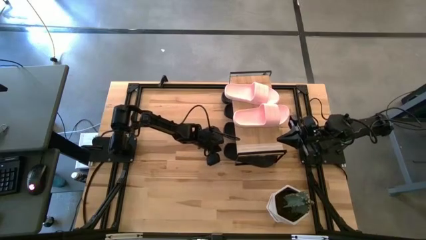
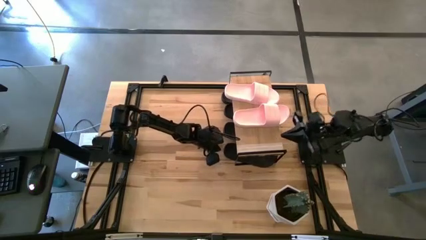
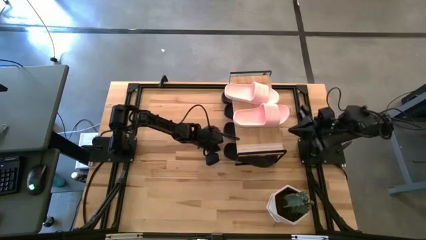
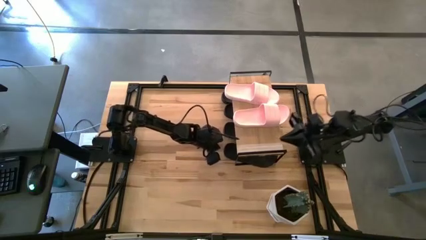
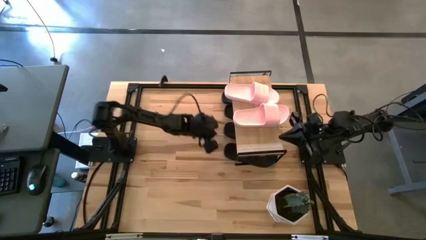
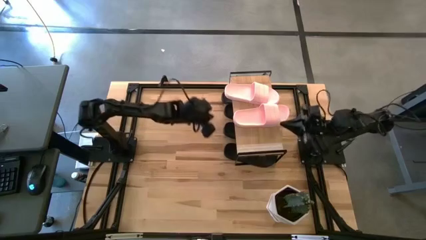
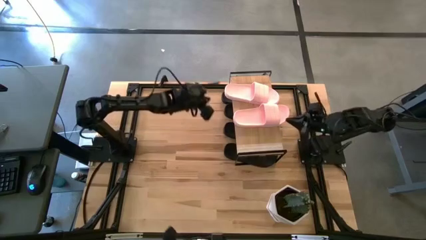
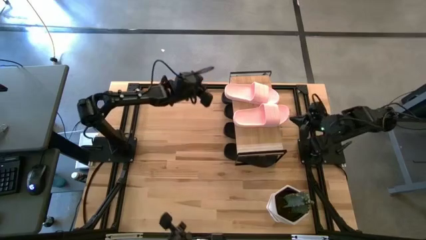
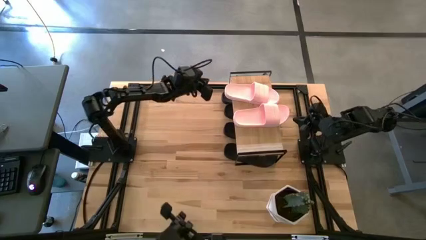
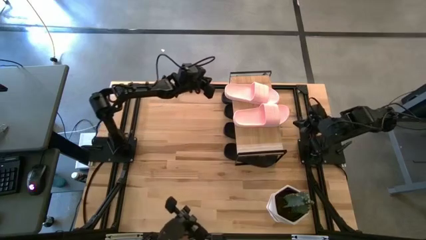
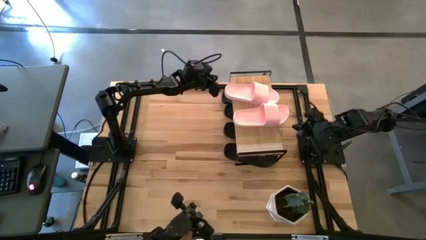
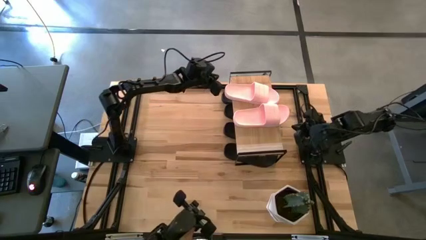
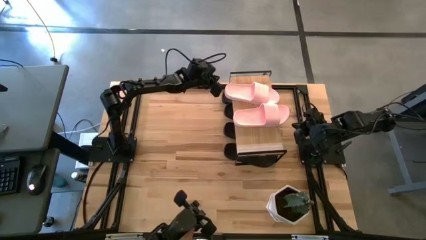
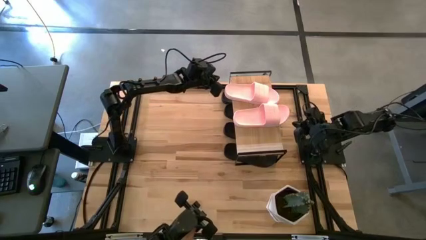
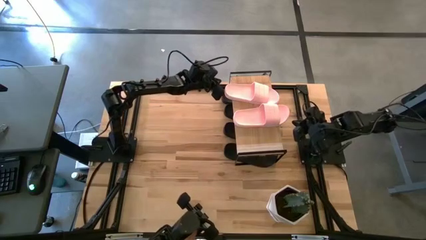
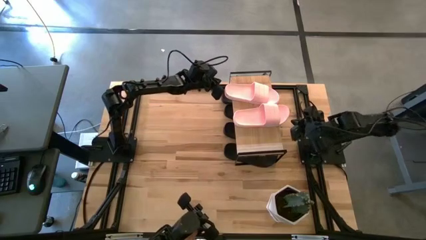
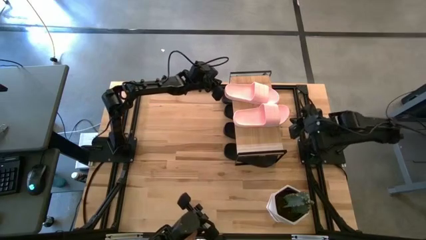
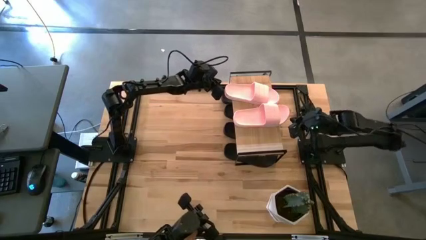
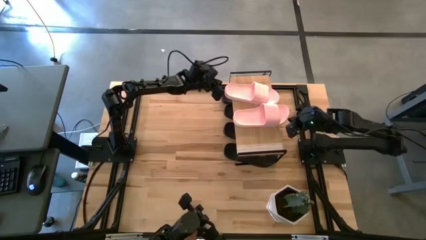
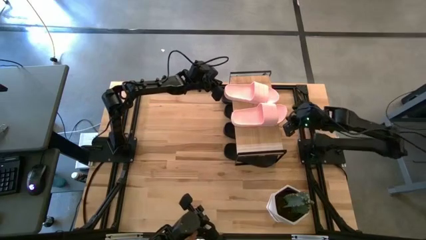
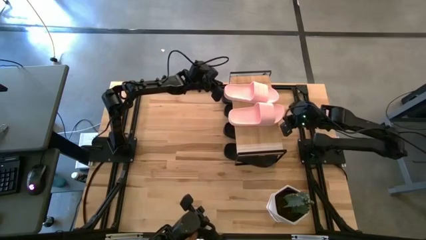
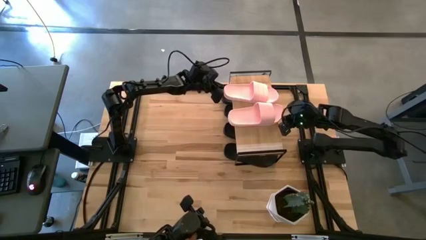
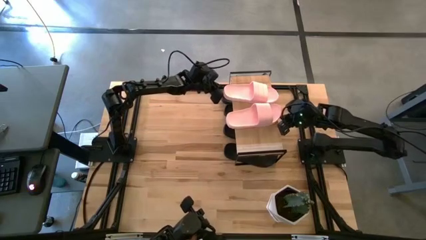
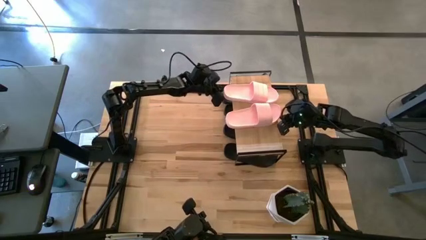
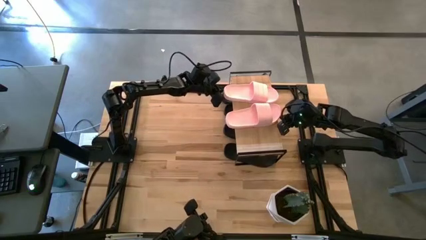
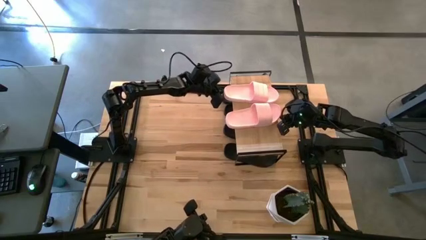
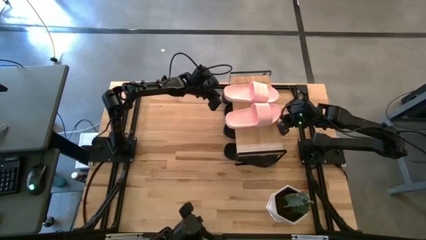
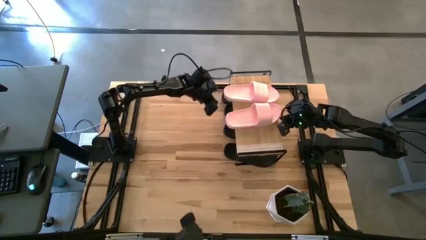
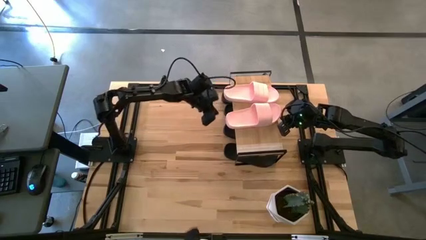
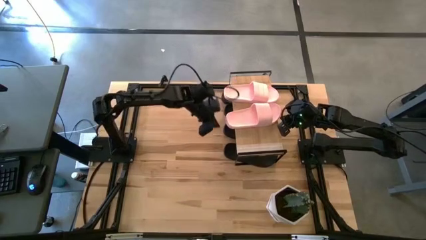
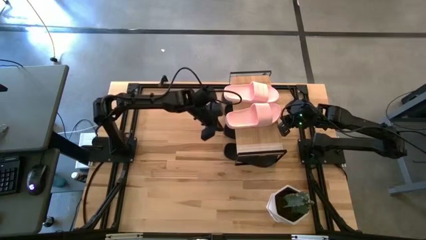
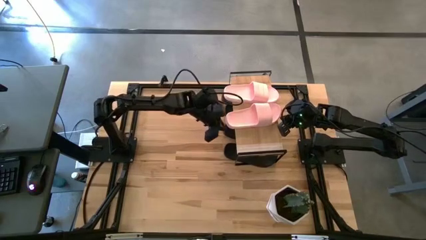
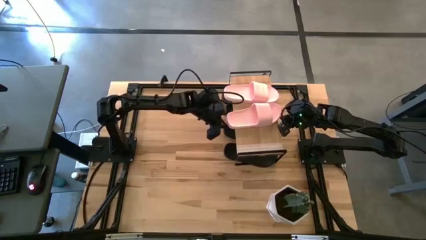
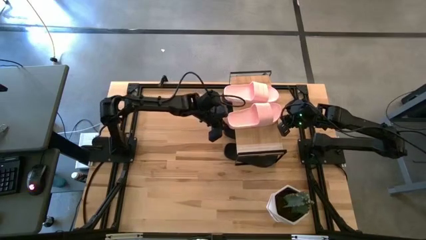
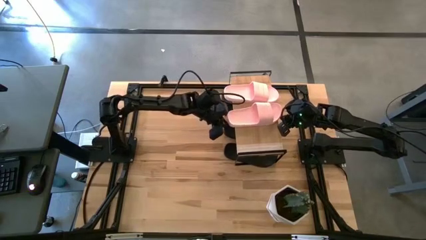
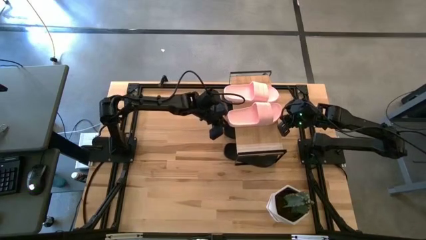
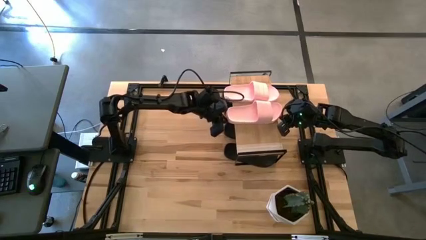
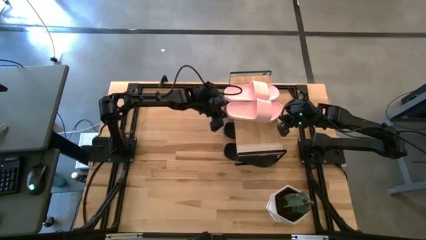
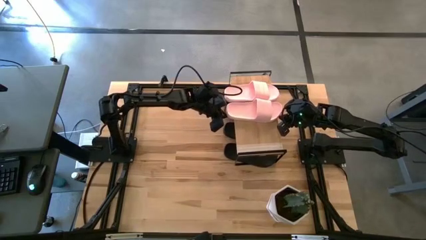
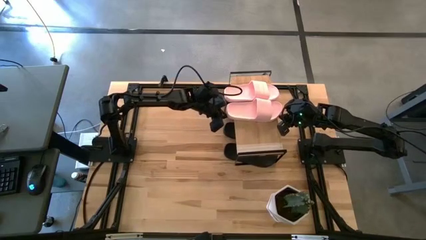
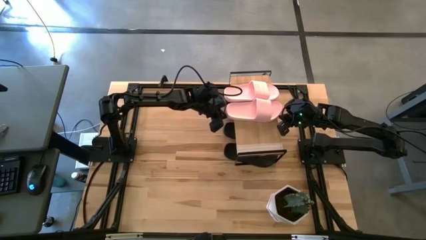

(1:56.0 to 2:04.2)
Task: Pick and place slides into the shelf
Adjust the pink slides on the shelf

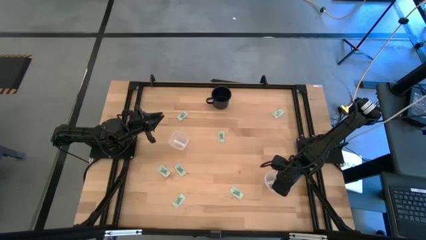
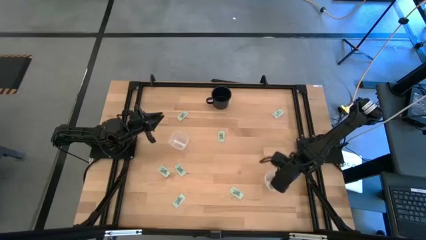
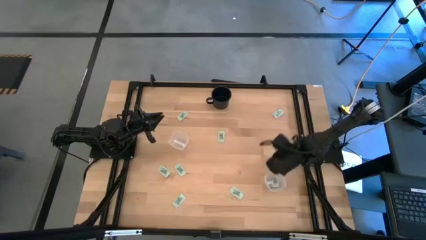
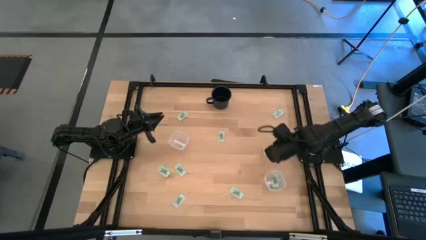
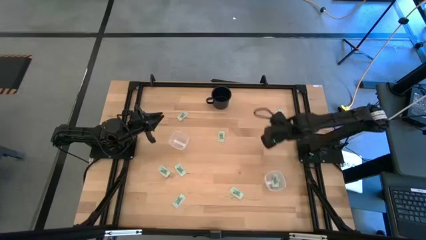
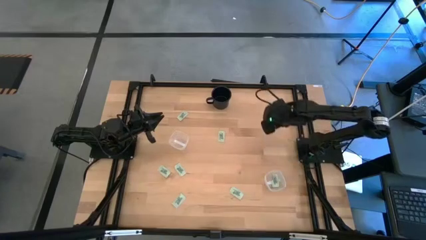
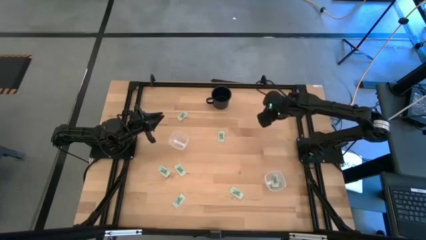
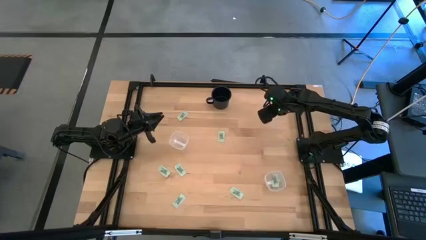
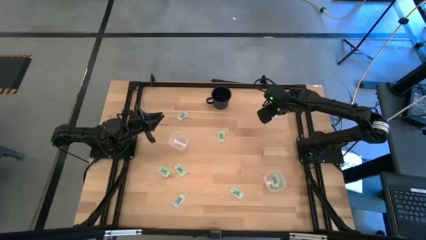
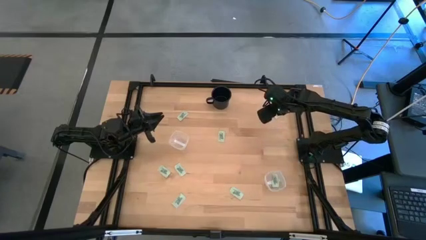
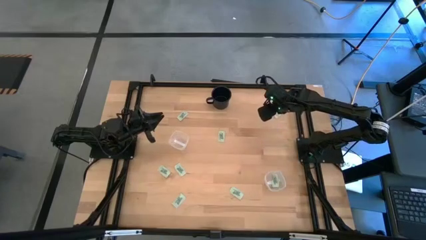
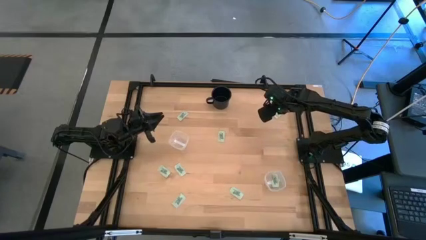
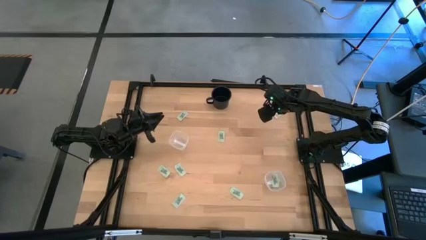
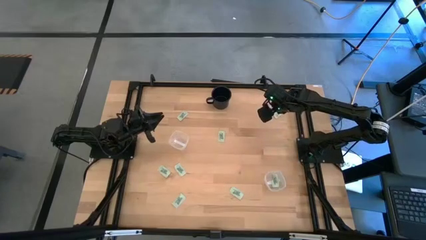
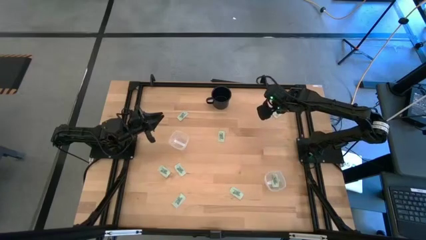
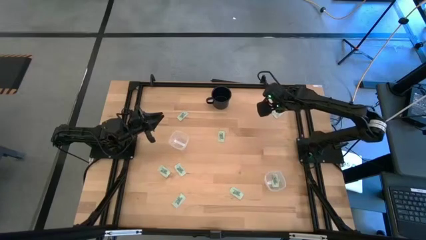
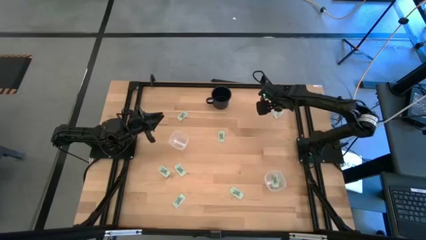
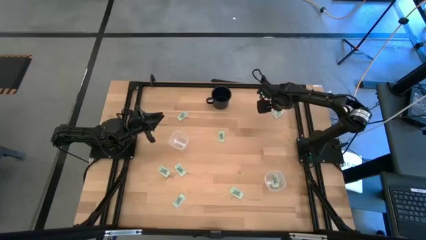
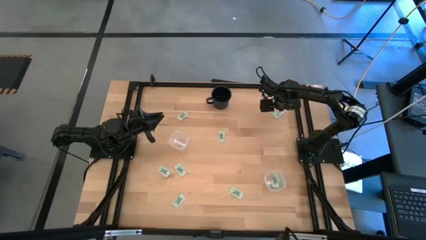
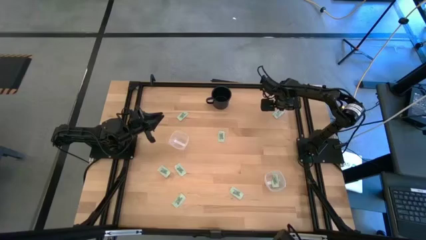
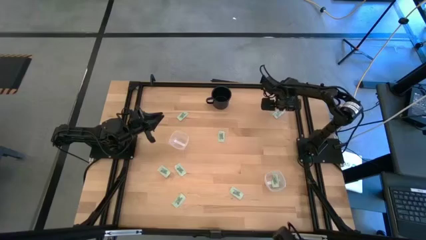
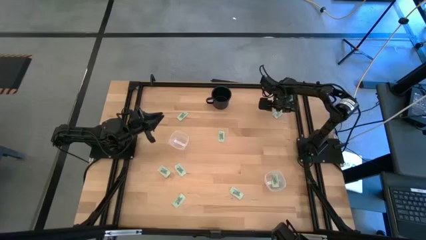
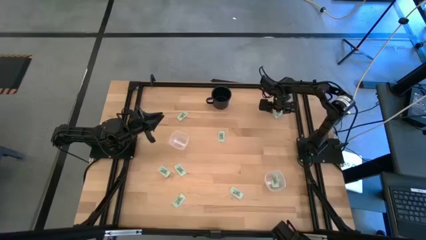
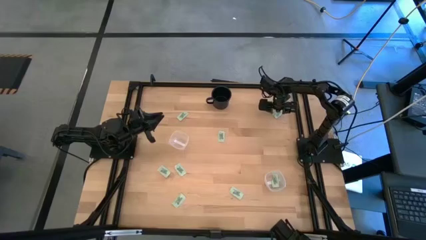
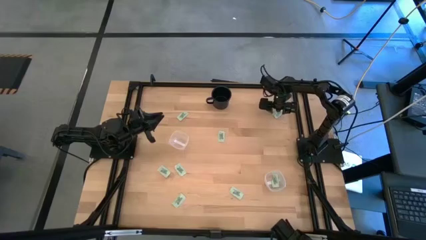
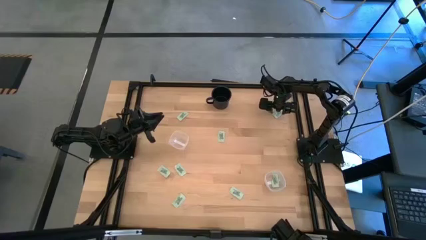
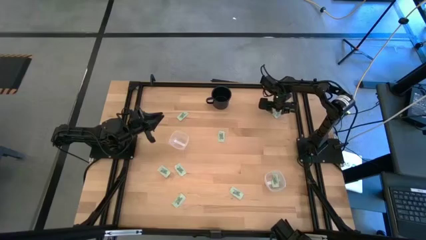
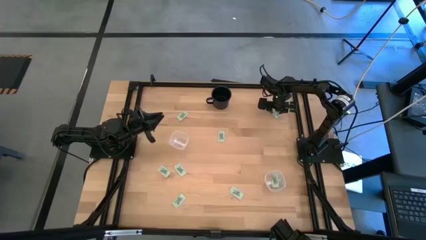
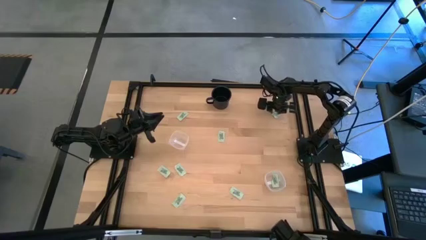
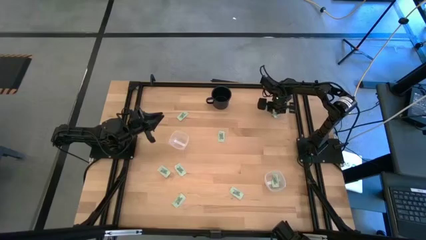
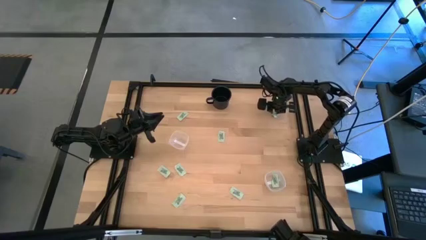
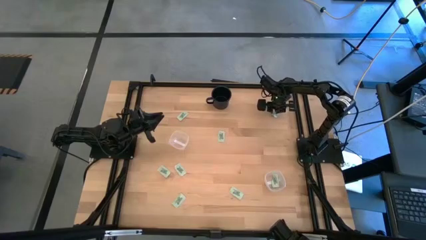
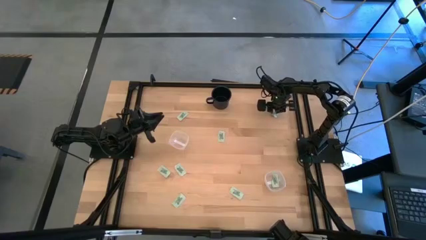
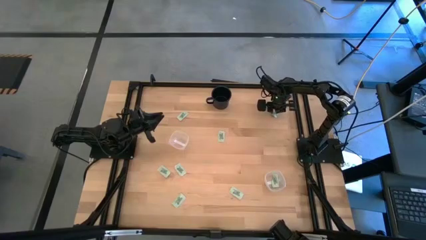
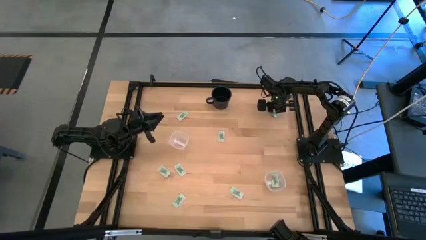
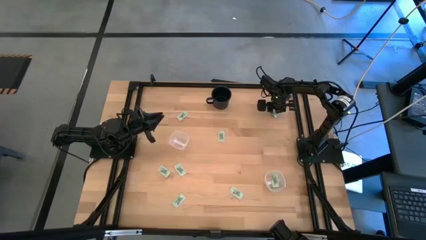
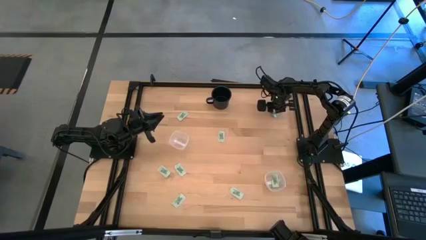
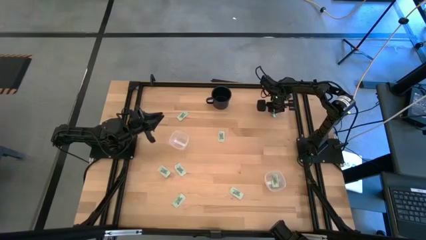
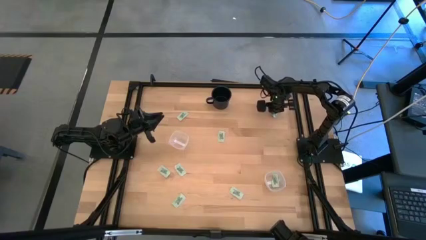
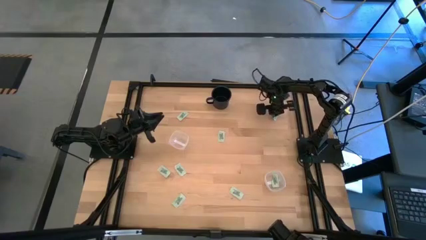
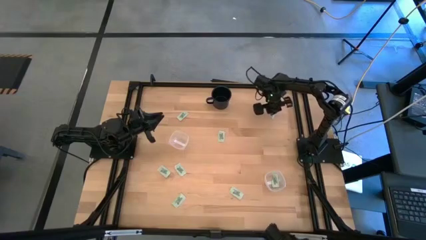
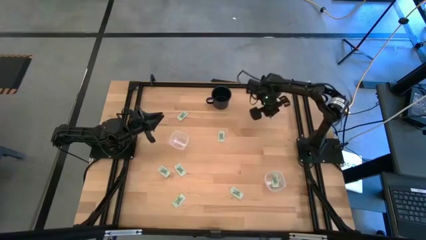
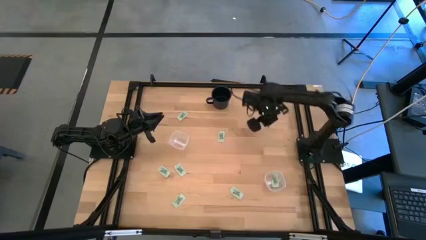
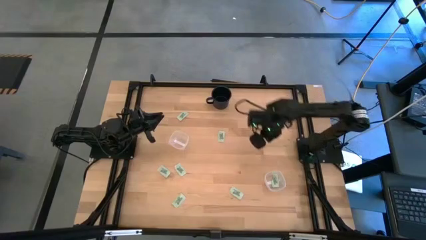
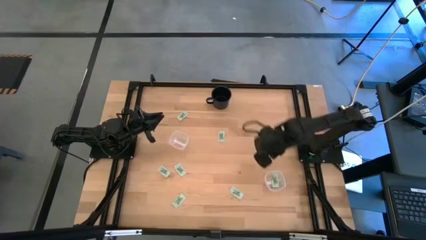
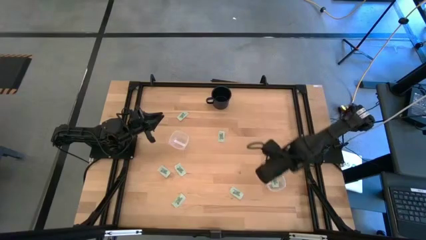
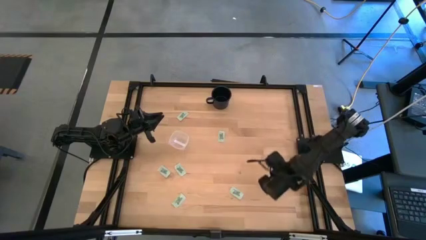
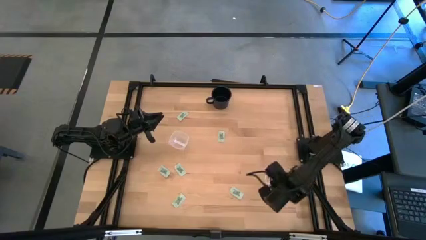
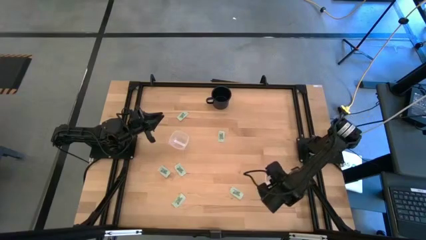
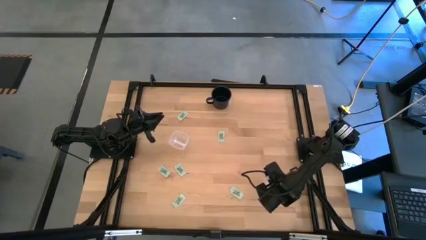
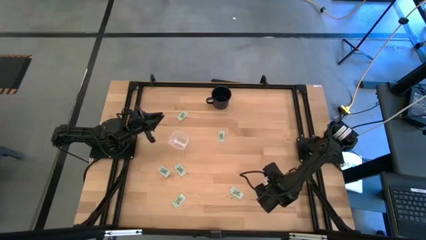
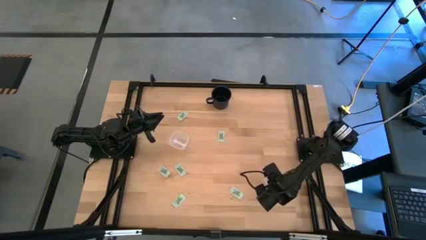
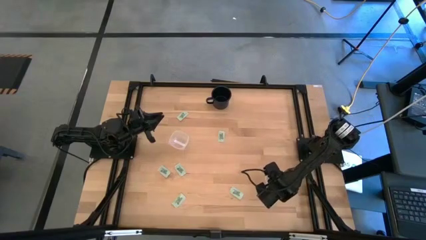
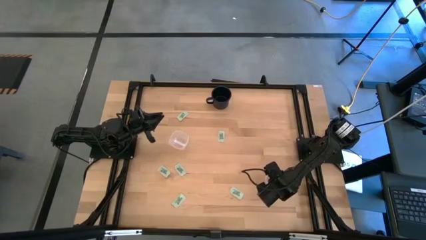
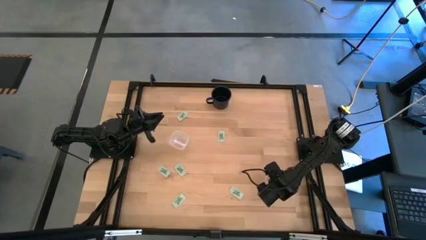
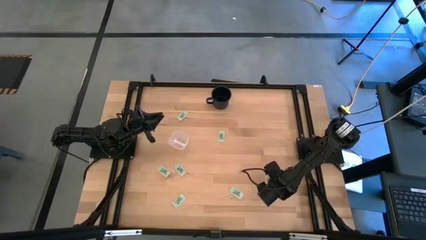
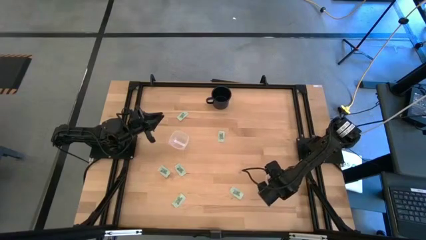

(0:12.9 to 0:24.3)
Task: Pick and place items into bin
Put the white stevia packet into the bottom transparent bin
